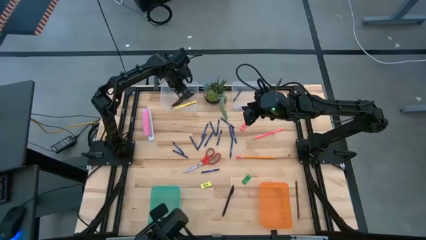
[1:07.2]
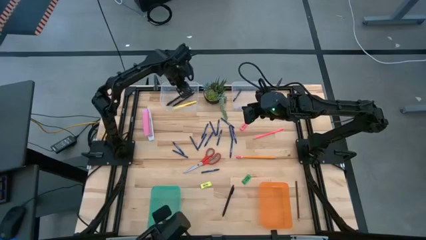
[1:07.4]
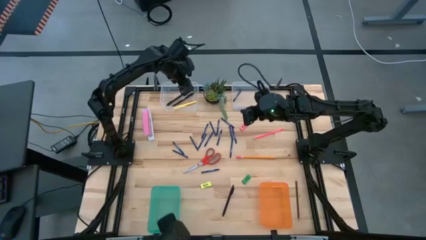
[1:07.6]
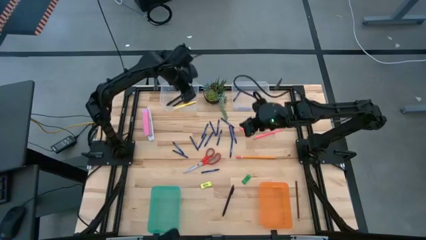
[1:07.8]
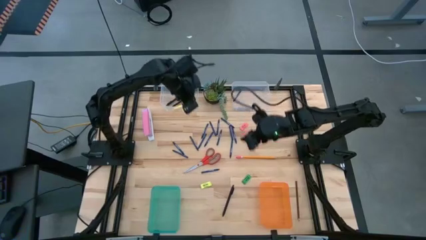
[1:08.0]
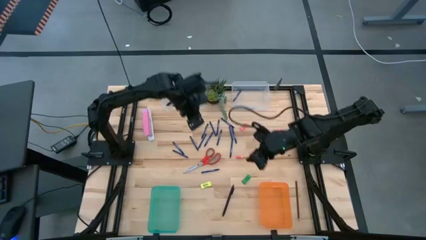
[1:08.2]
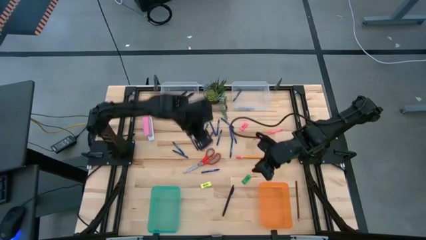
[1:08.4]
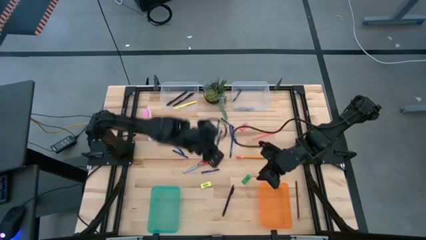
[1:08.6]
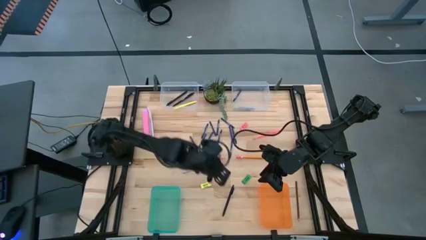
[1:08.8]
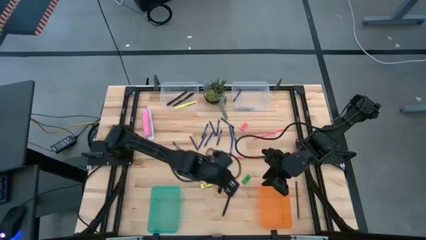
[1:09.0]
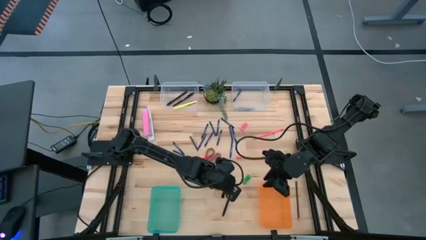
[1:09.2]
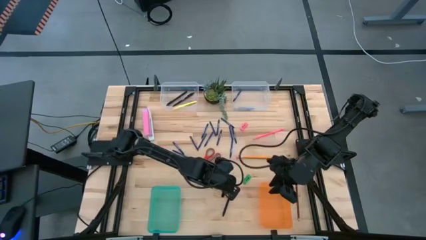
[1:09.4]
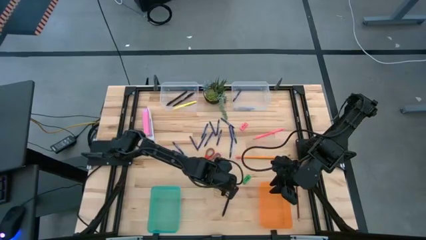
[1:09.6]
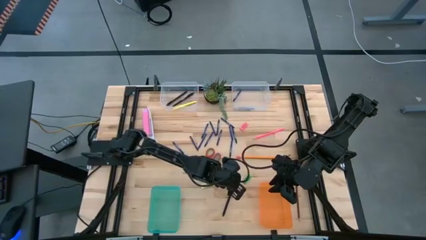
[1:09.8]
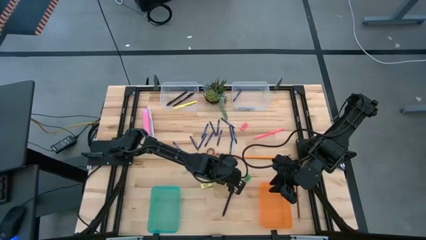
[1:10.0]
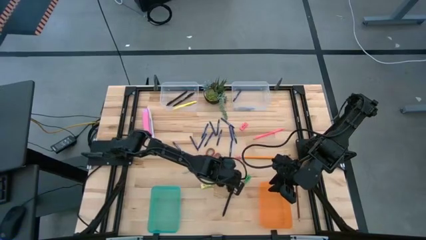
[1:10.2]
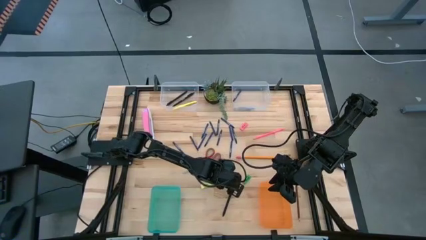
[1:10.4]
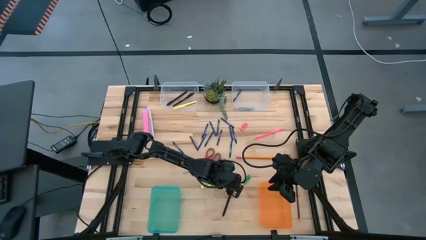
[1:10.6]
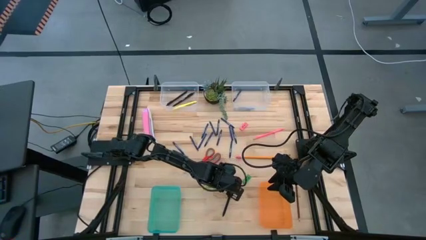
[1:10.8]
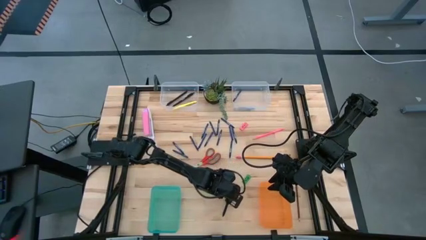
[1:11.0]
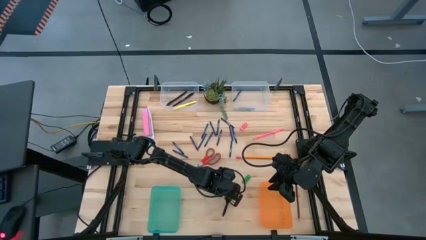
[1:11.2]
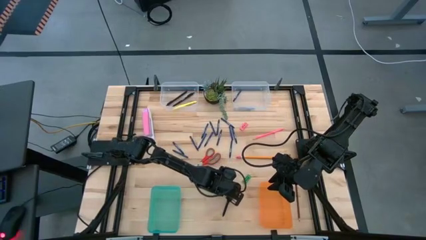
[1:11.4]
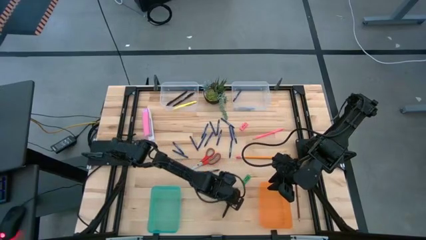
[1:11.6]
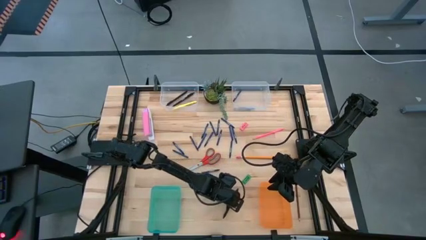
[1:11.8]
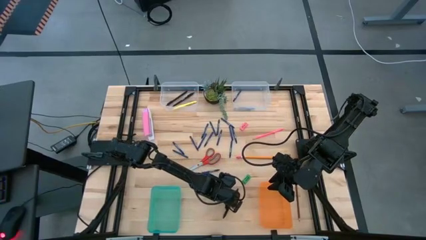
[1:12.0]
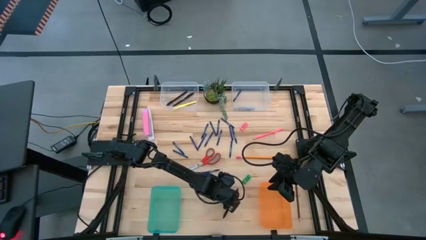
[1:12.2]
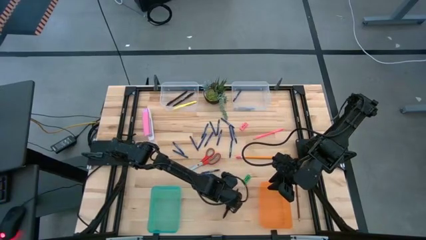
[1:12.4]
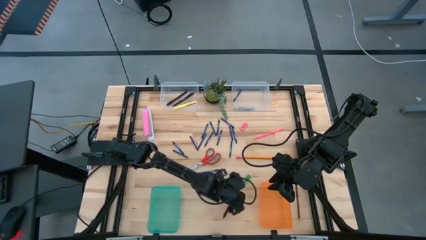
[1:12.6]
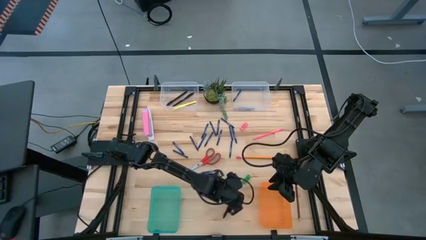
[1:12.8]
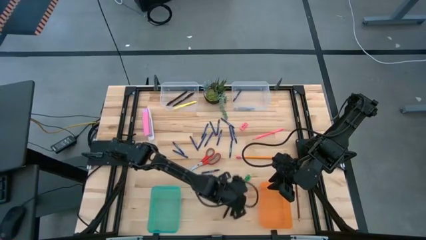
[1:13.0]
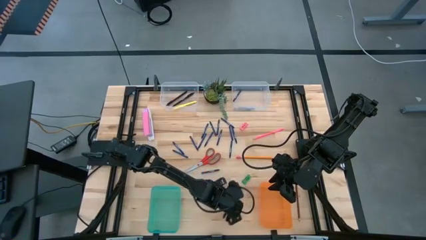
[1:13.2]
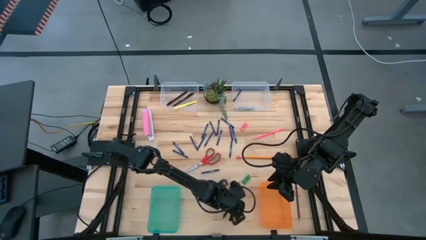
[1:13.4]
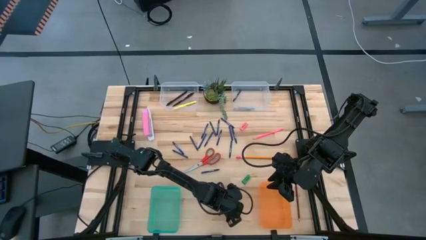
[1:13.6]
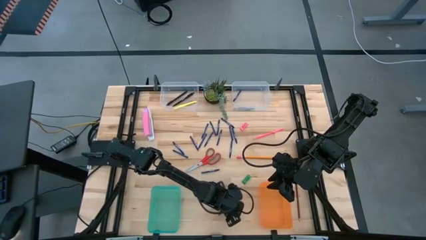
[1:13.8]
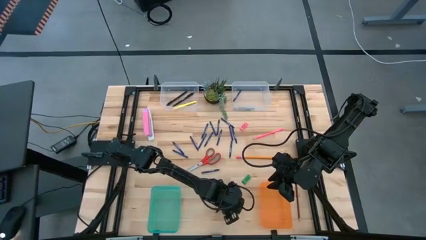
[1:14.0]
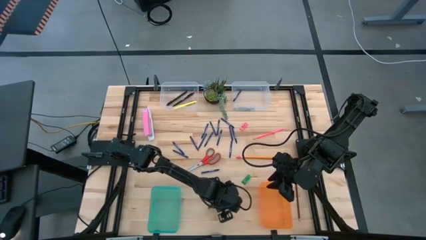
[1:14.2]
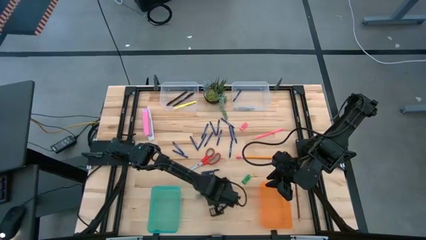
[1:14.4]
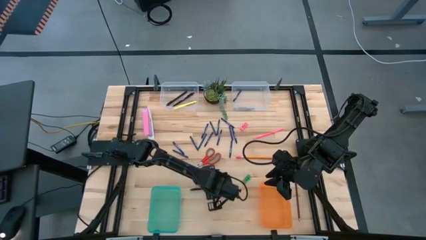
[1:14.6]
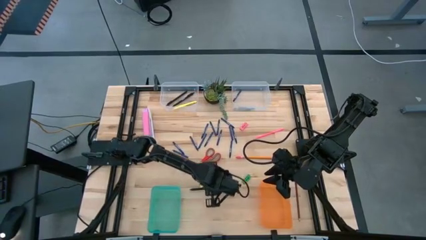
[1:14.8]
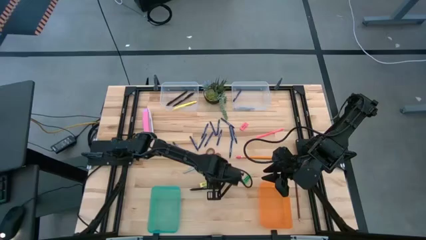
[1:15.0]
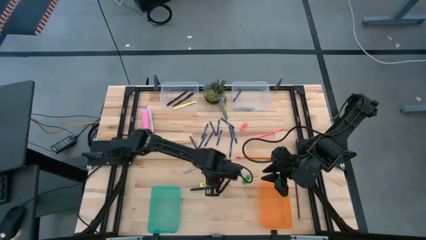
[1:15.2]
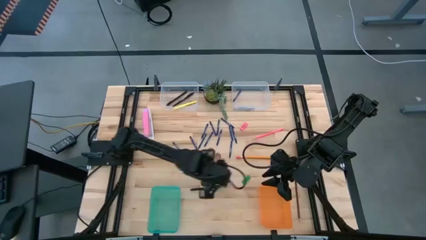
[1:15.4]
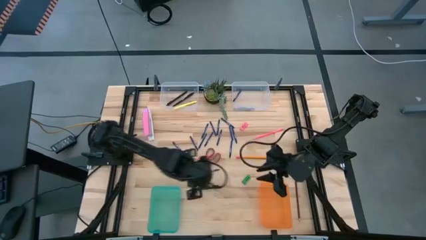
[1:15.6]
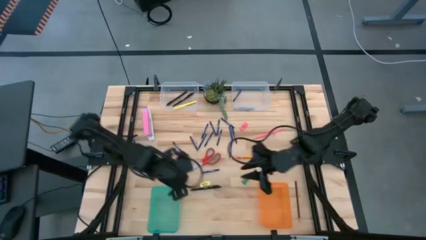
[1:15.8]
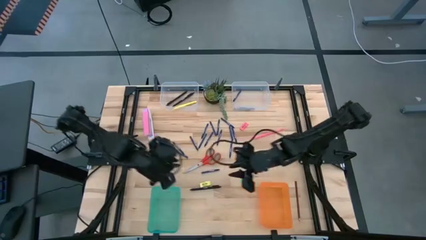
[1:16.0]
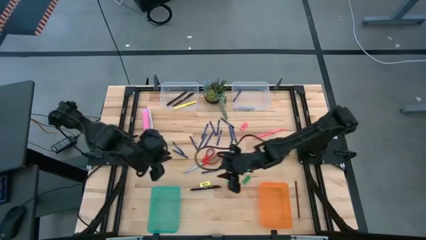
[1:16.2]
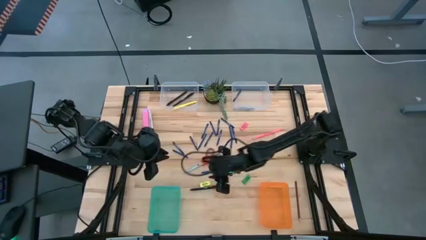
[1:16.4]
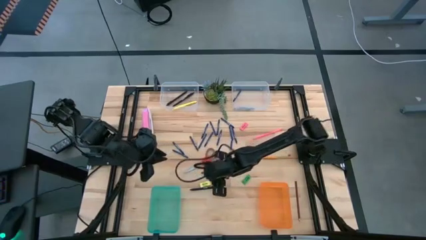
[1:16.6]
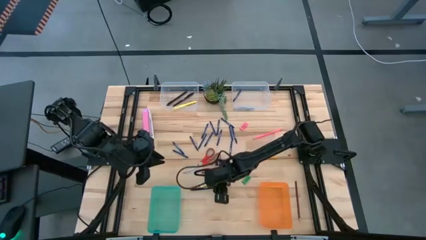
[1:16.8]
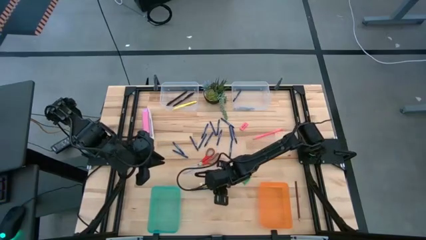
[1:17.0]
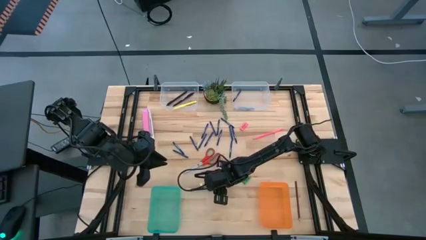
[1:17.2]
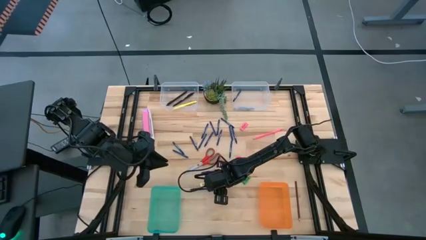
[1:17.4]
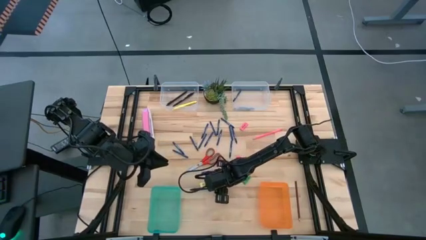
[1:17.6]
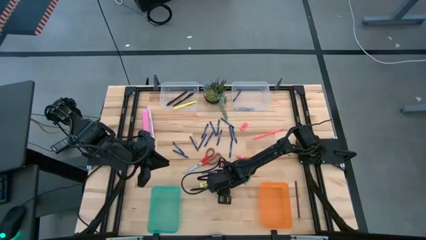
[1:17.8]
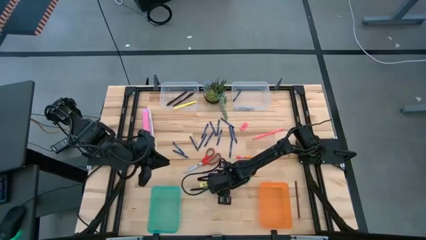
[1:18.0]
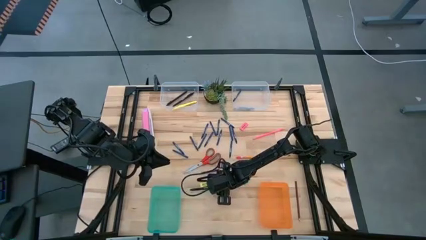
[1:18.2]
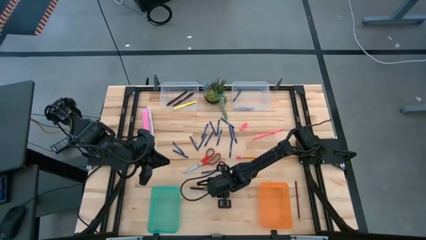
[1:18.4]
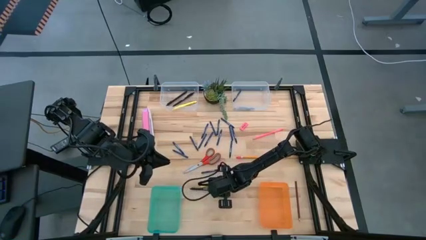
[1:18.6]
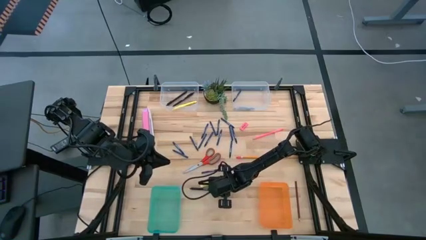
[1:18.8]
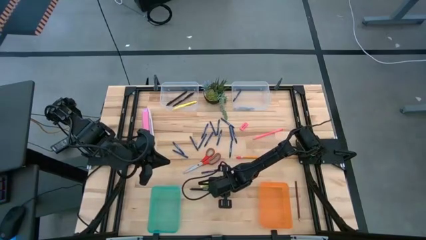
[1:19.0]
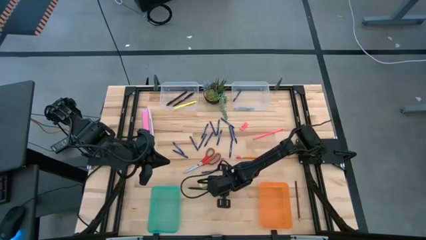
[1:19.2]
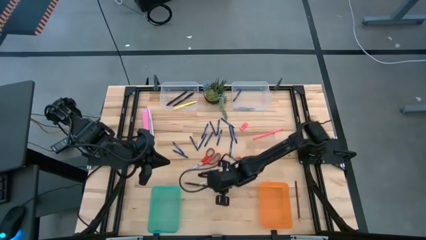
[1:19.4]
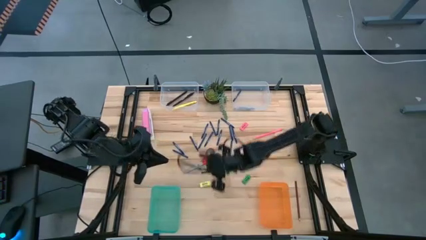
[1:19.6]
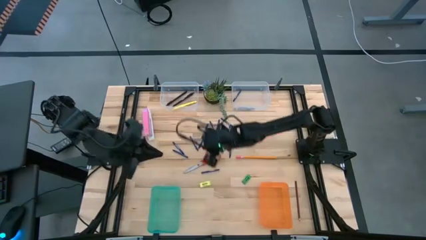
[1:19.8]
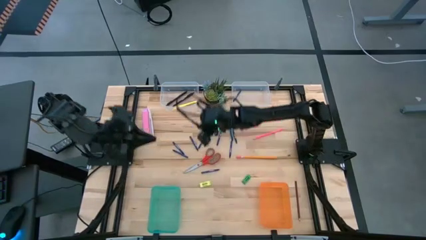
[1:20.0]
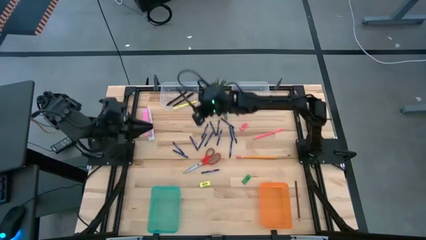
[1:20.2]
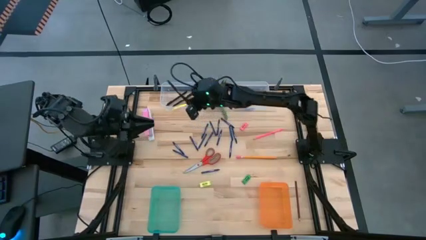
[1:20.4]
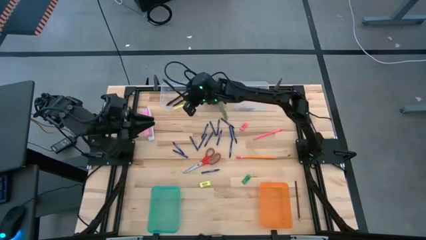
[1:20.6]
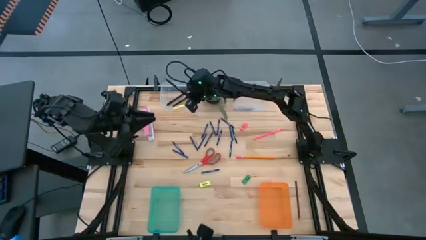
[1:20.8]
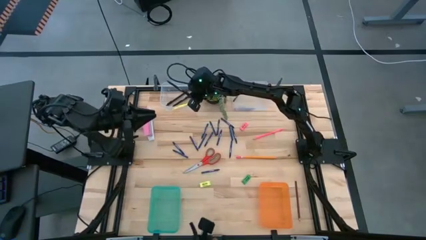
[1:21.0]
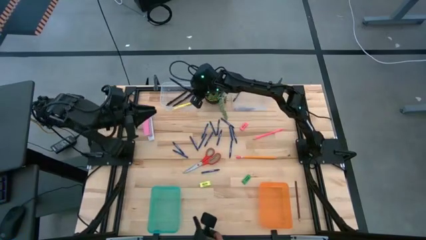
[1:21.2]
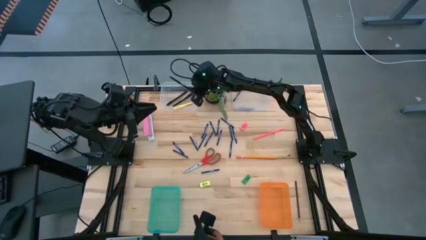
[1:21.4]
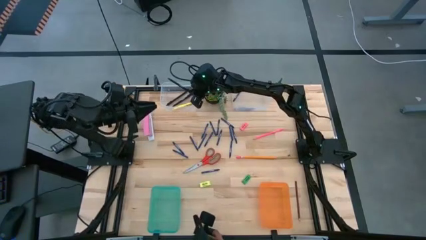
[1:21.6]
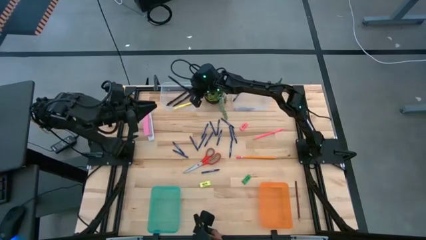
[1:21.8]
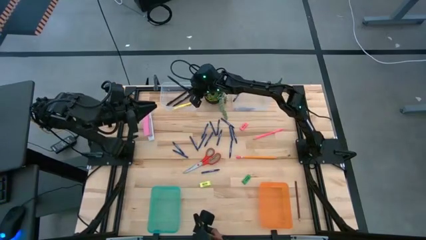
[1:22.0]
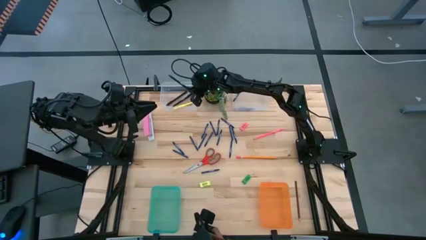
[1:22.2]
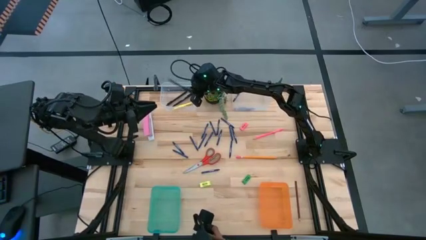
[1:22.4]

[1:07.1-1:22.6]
Task: Sort crayons/erasers/pens/pencils in bins
Put the black pen into the left transparent bin

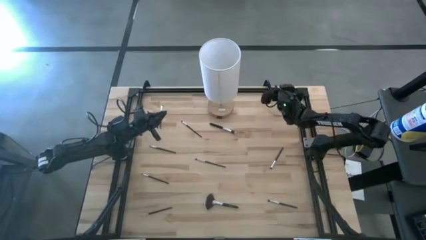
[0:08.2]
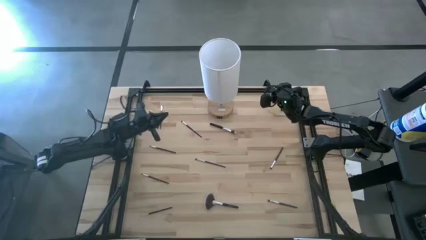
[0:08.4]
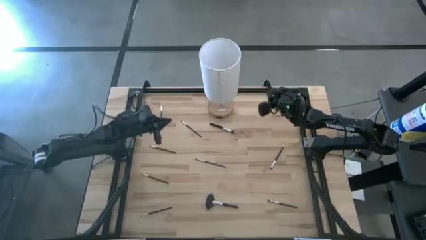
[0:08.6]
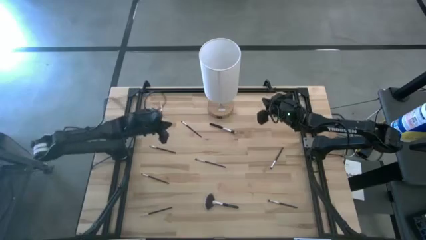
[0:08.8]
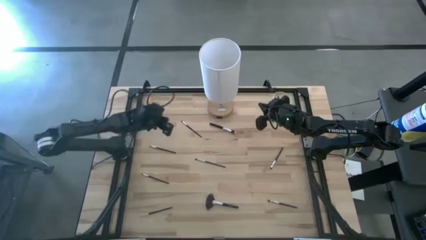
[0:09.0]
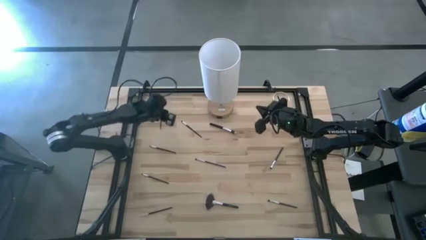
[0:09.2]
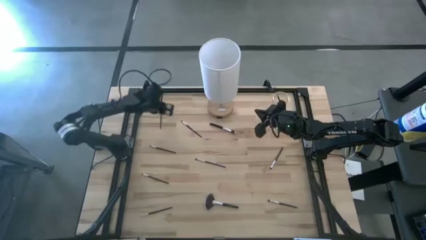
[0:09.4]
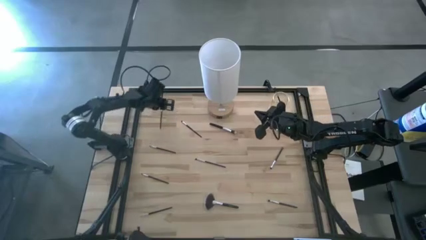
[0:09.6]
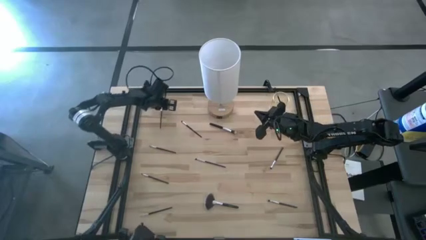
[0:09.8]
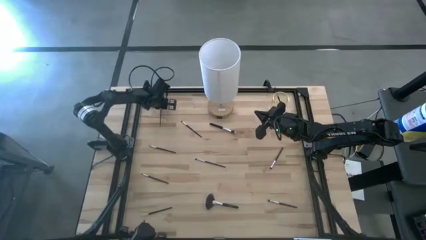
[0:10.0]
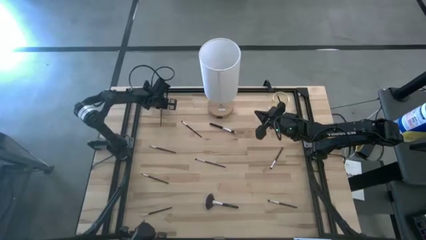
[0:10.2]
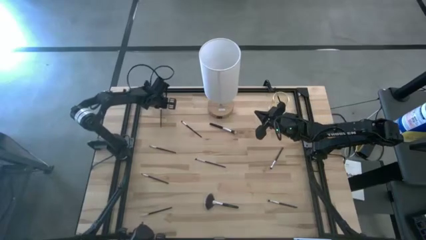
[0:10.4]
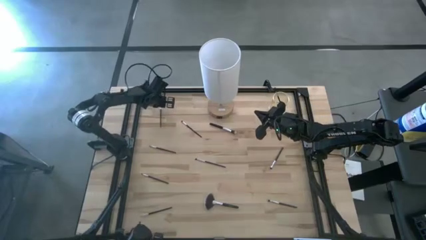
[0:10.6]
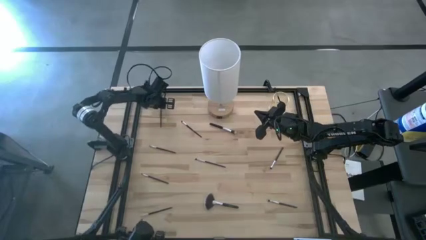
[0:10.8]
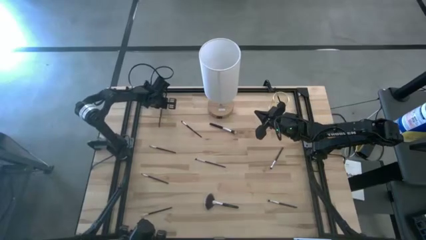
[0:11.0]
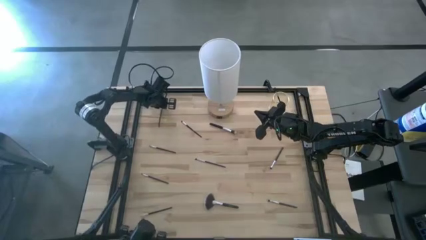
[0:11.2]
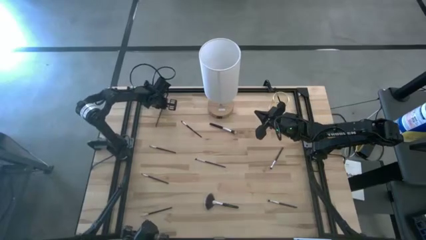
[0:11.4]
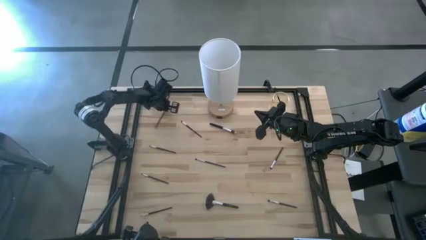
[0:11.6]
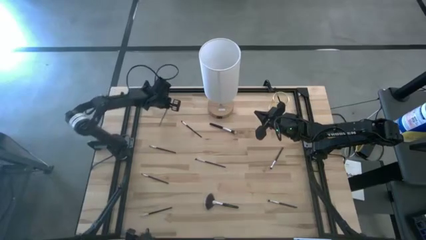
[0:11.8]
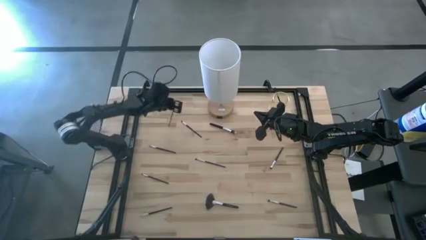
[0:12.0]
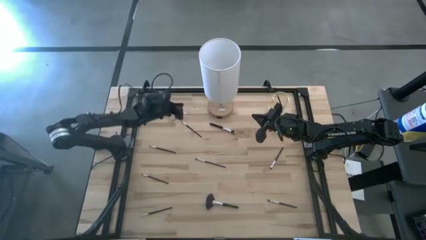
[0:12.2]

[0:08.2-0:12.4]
Task: Pick & Place Makeup Brushes
Put the eyeshadow brush into the makeup brush holder
